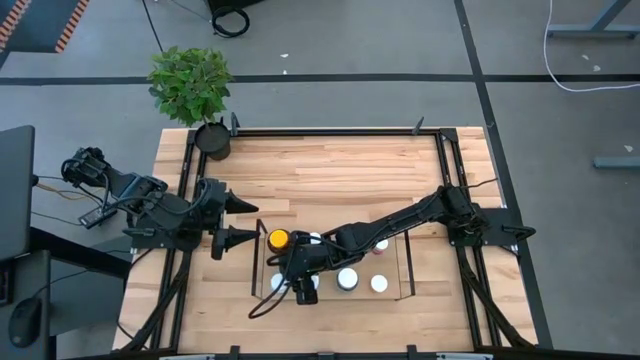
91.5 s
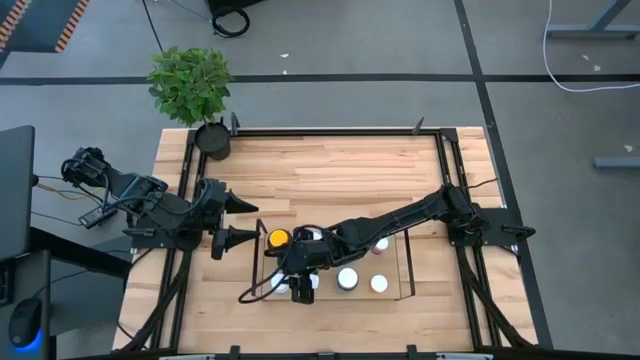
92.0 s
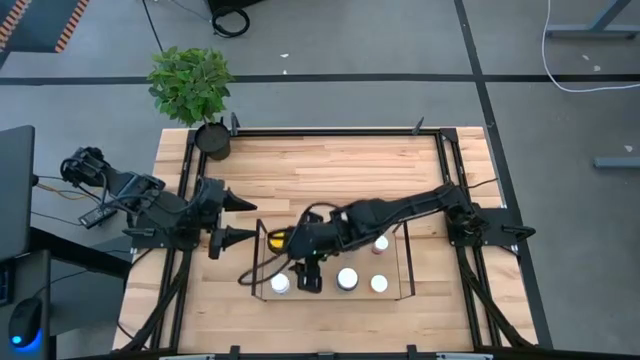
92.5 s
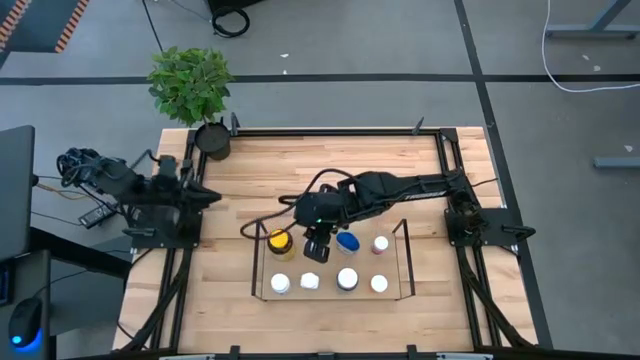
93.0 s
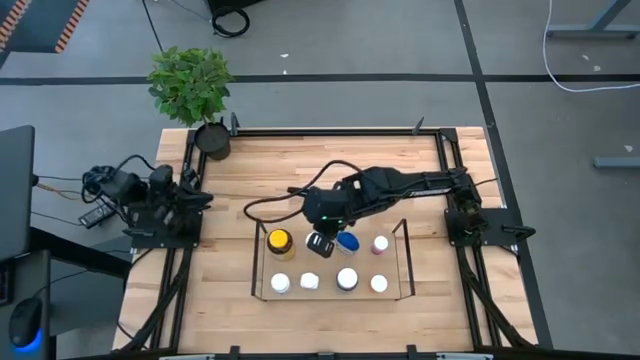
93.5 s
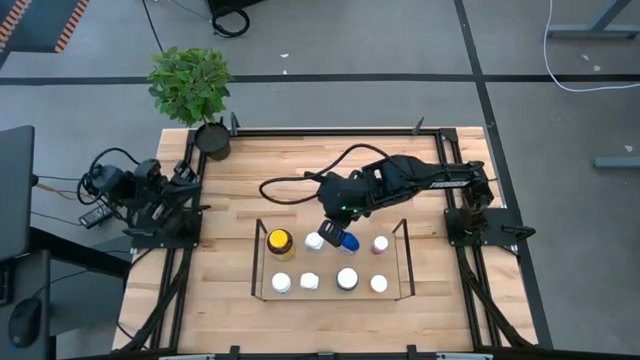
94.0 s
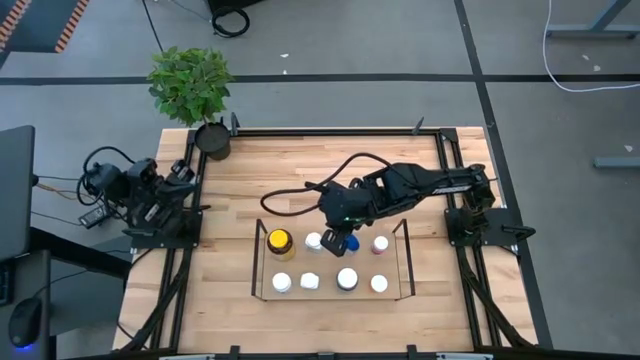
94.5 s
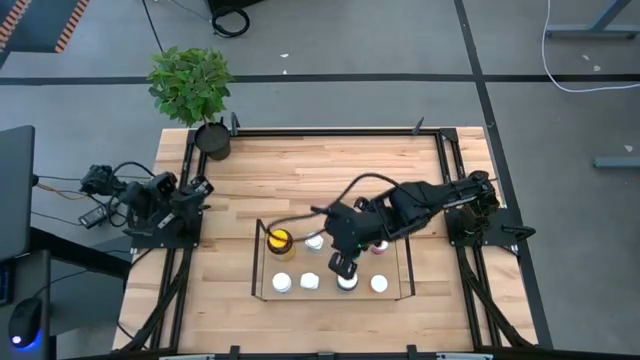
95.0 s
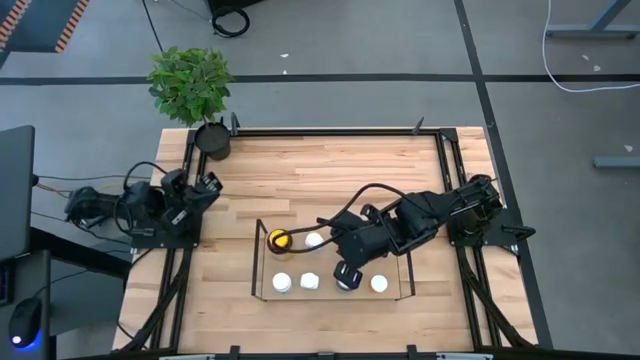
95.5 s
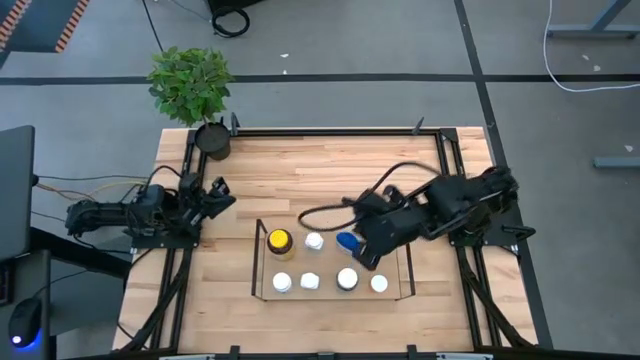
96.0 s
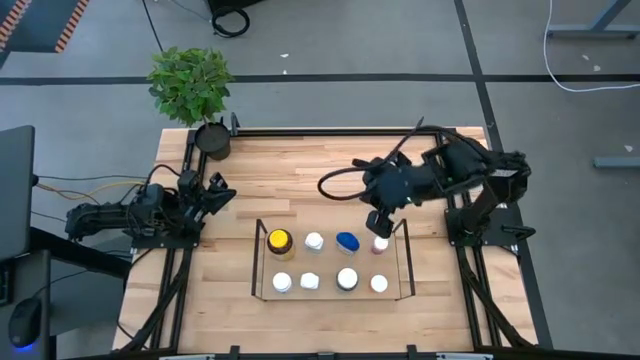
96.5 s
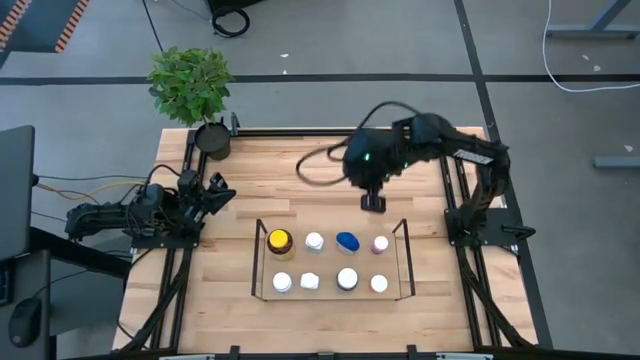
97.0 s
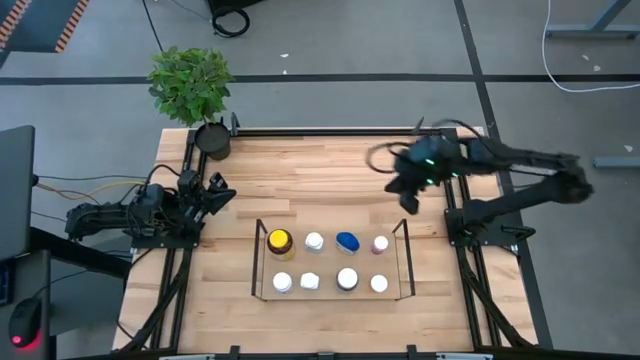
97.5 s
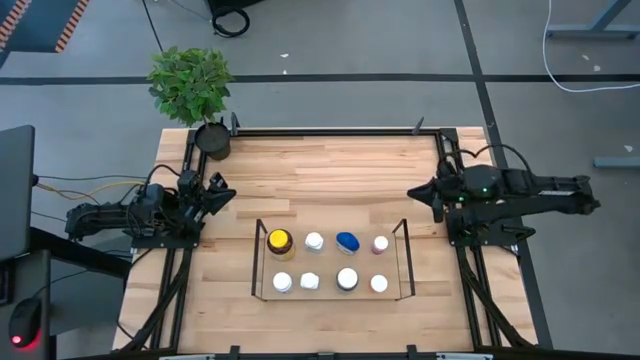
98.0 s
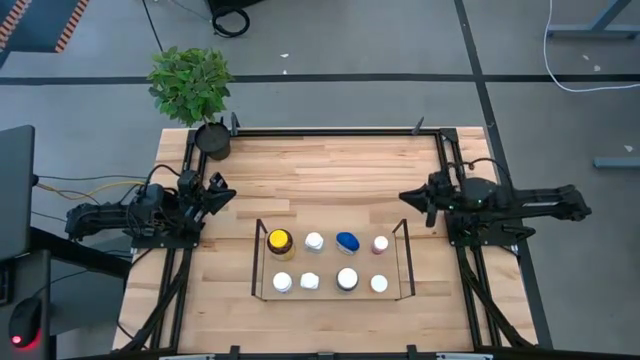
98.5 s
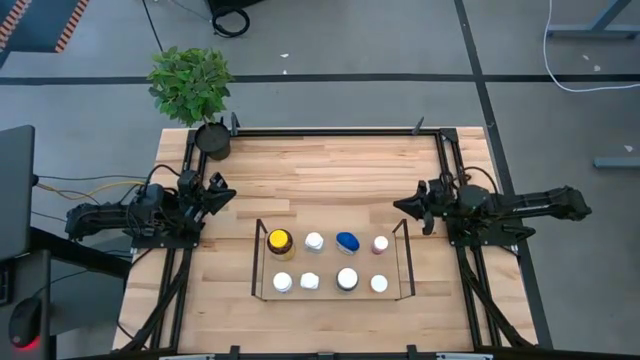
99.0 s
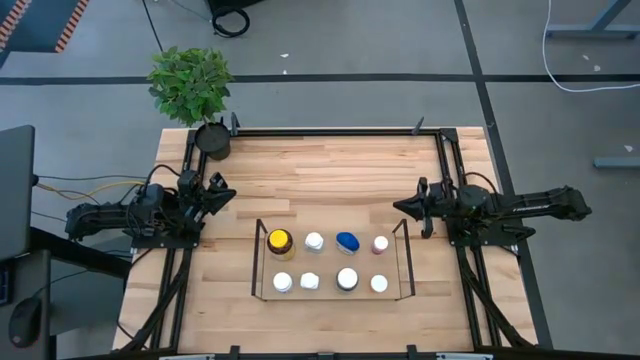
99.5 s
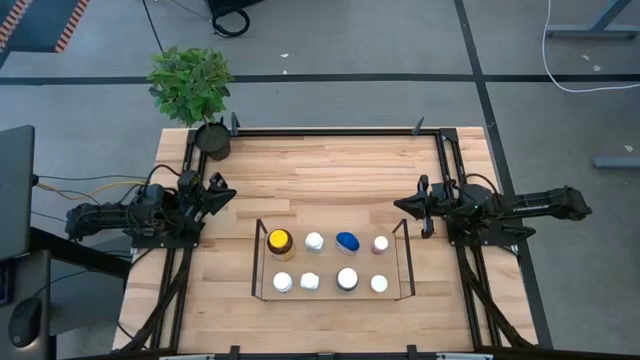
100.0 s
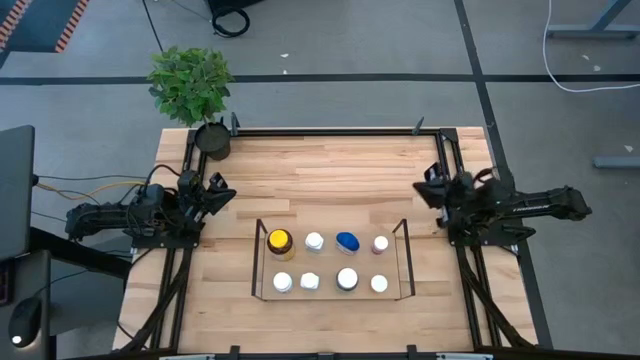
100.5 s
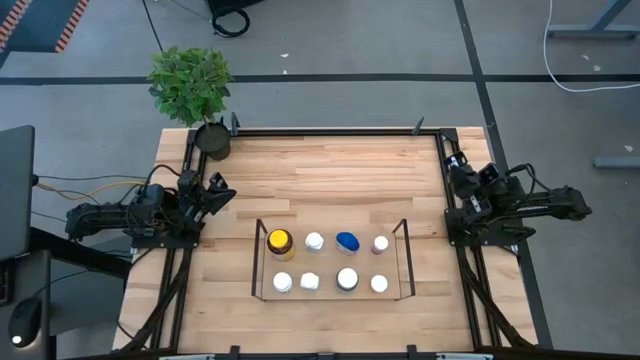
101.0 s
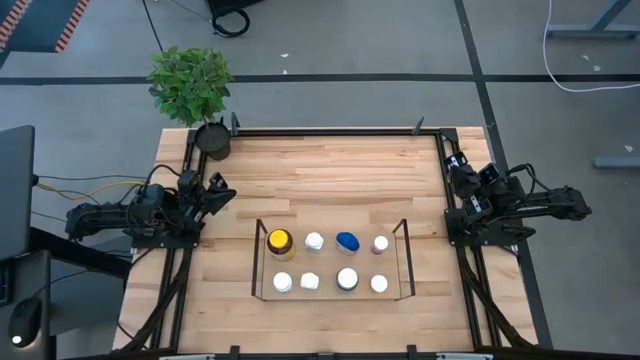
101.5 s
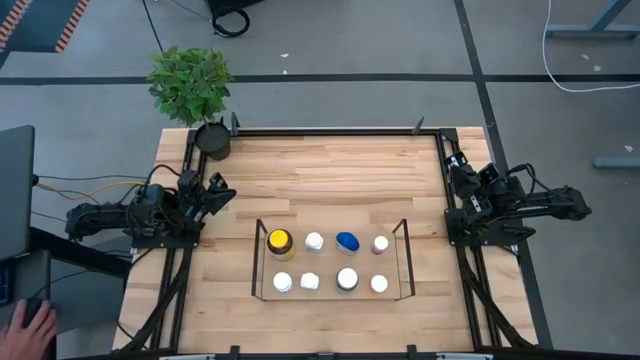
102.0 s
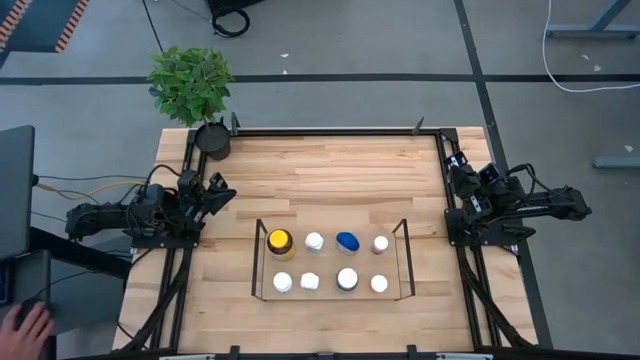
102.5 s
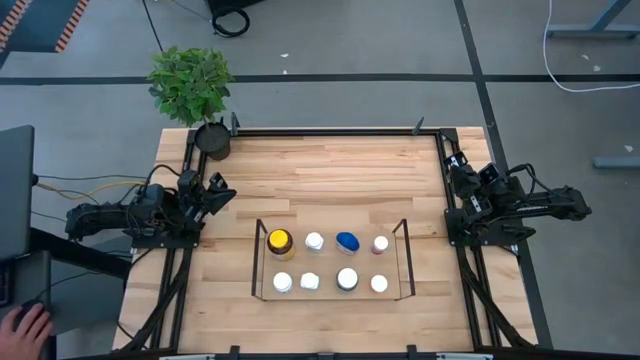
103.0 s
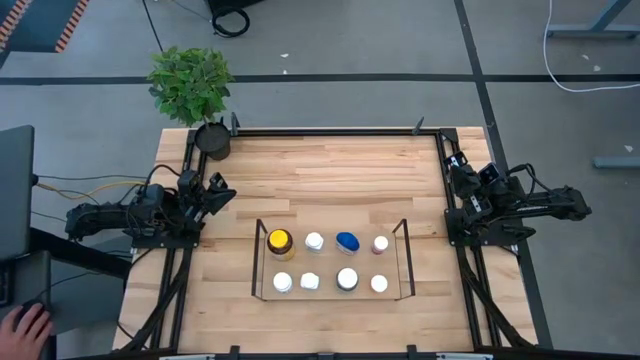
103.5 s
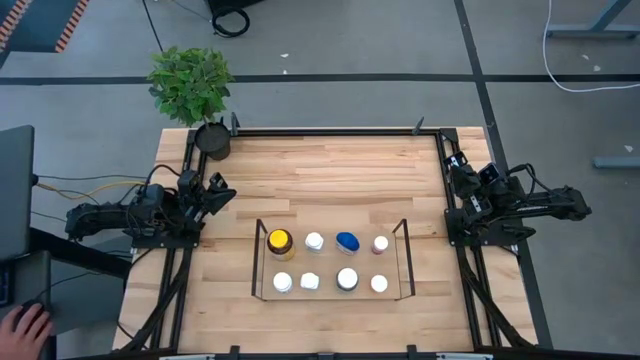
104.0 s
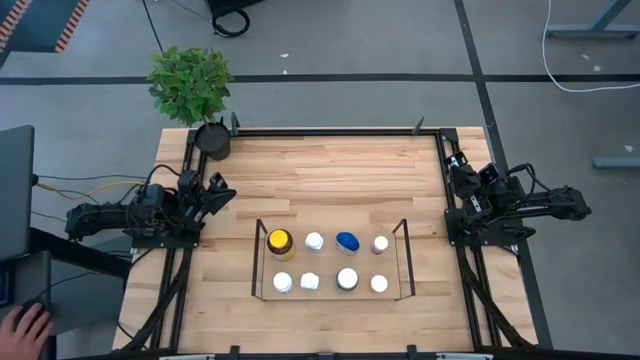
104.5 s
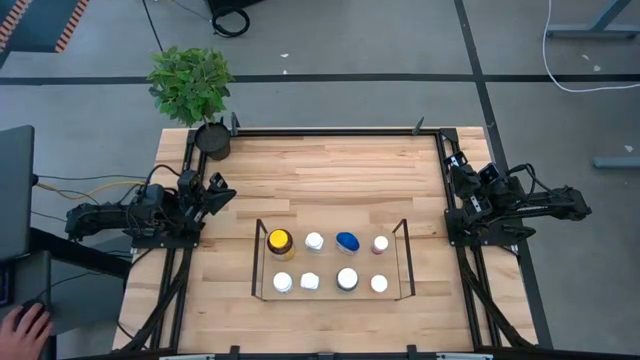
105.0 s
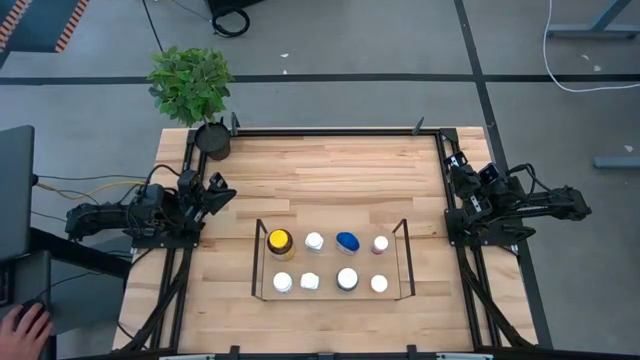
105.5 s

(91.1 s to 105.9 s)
Task: Pick and place medicine bottles onto shelf by color
Return to Home Position

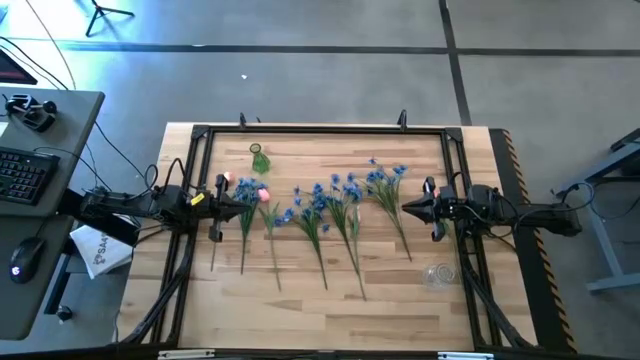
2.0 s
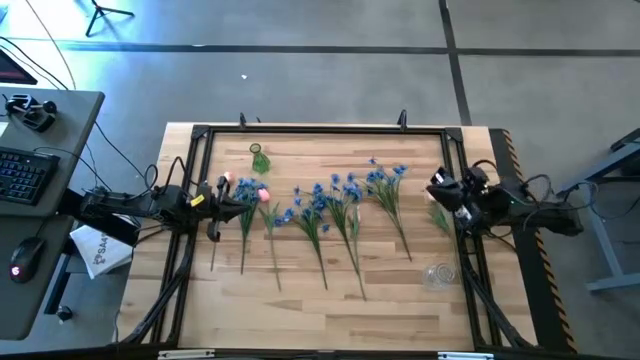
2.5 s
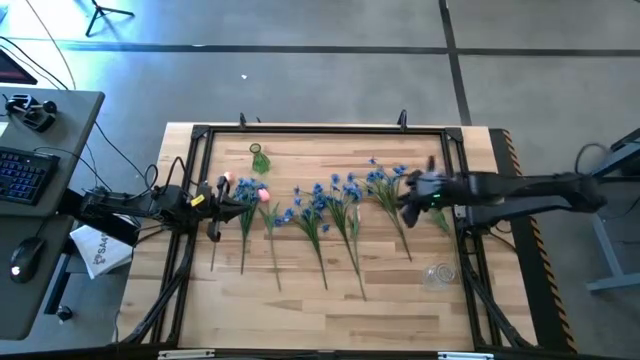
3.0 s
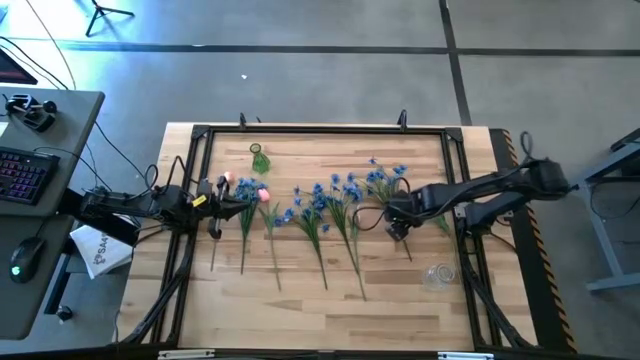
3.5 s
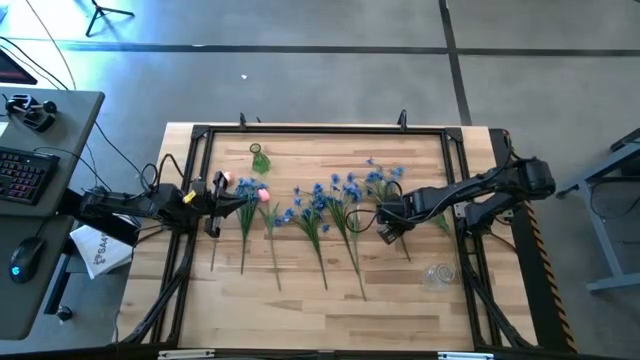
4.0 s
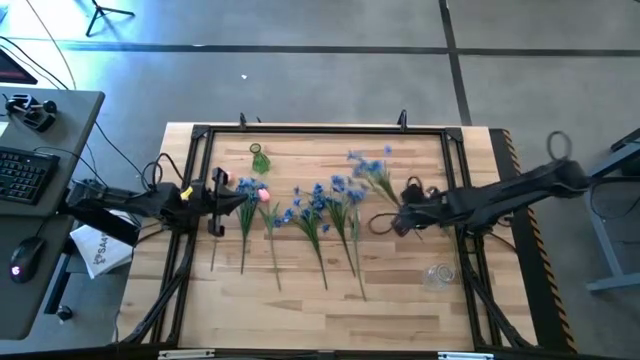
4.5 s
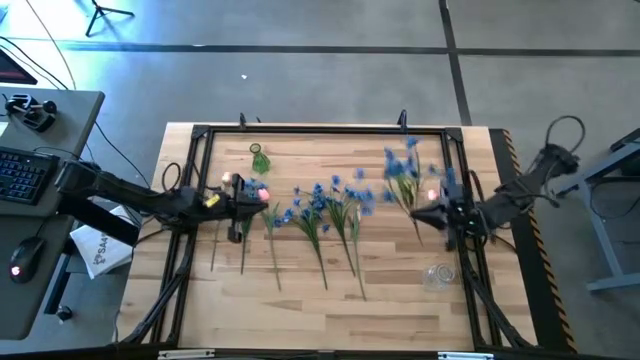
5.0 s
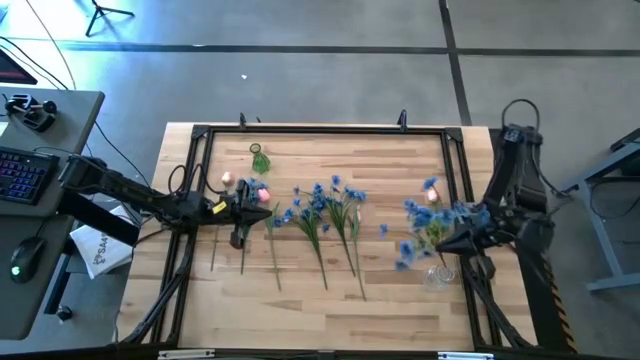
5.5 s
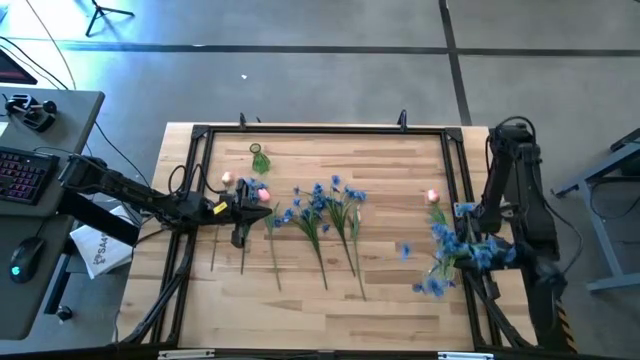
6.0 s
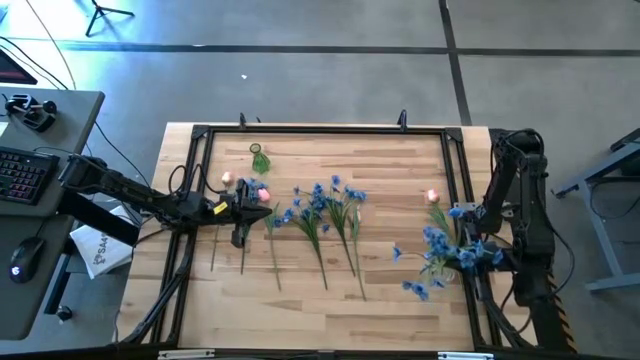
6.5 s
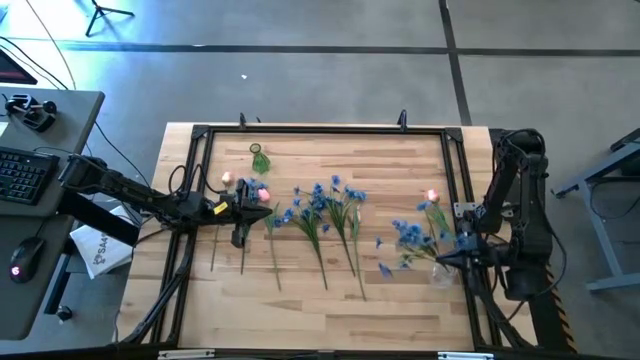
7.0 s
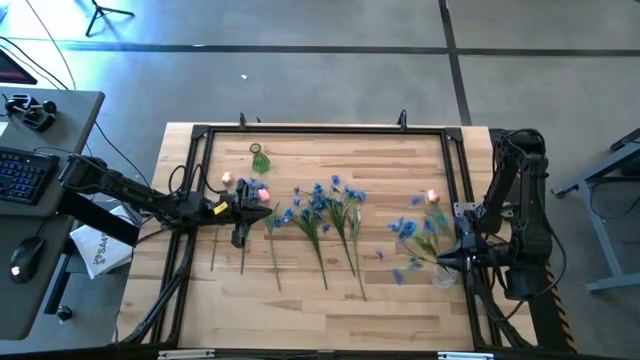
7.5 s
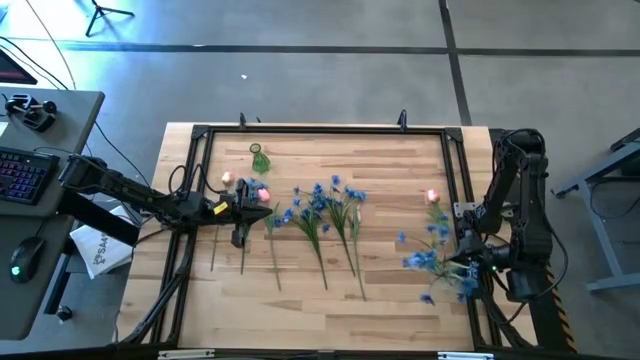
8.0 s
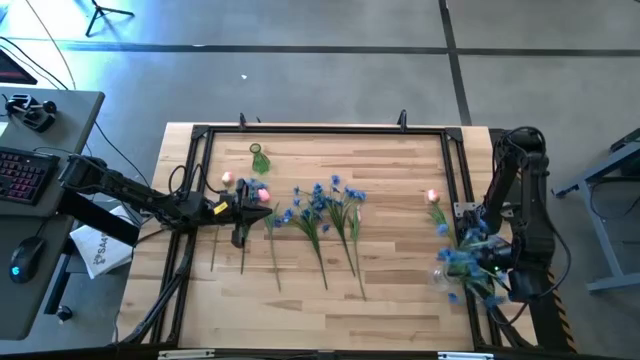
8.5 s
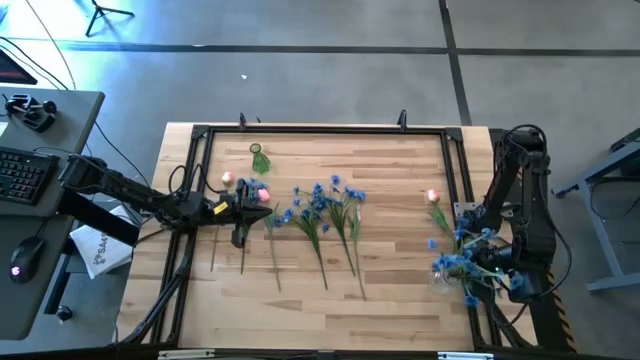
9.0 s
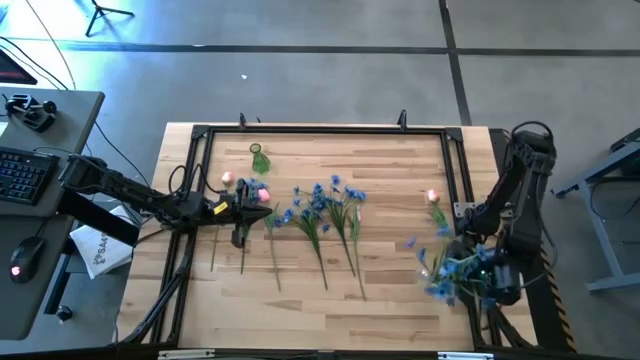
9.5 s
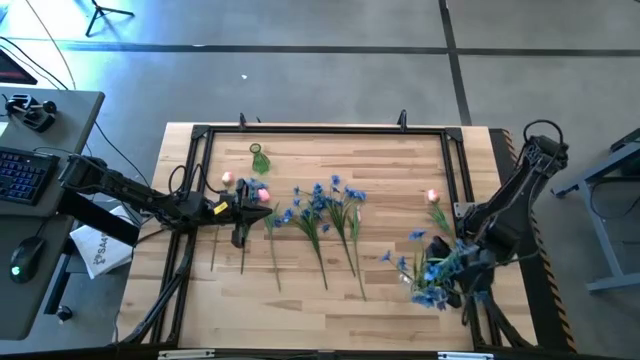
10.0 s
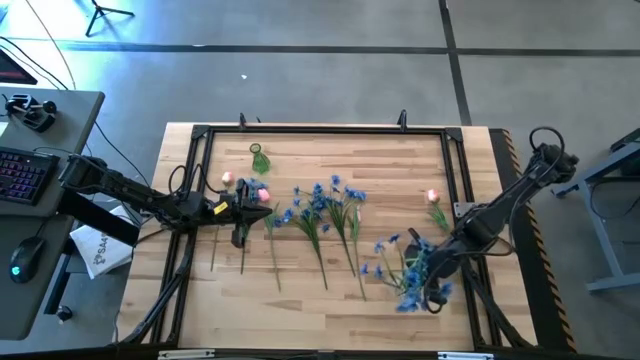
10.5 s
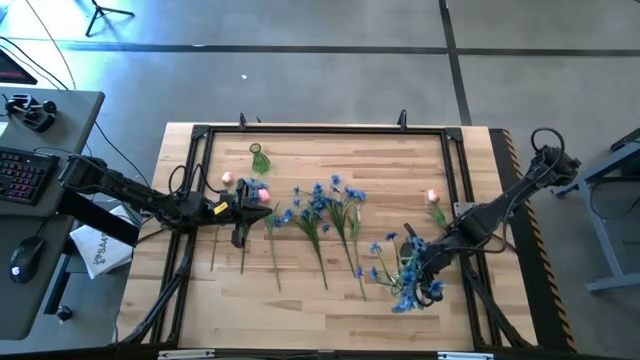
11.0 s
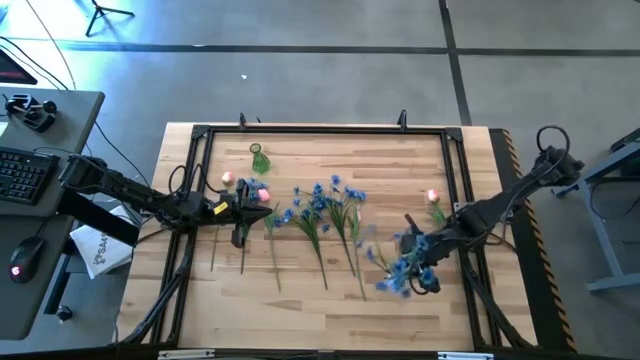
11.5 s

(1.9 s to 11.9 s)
Task: Sort flowers into vase by color
Put the right blue flowers into the transparent vase
